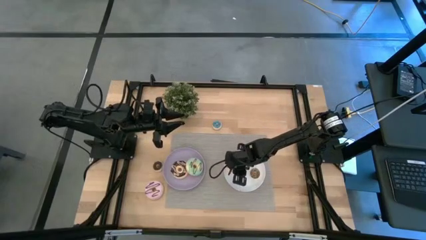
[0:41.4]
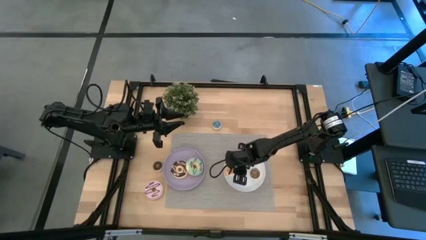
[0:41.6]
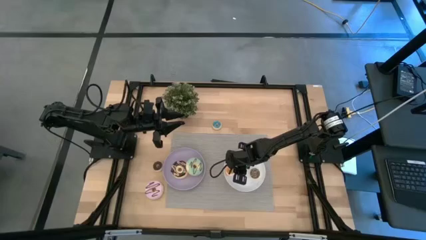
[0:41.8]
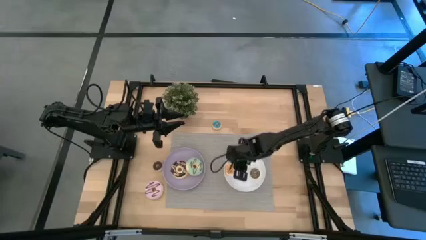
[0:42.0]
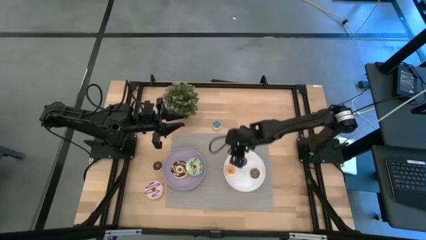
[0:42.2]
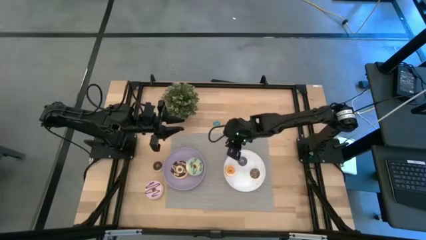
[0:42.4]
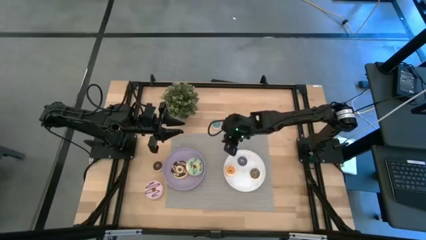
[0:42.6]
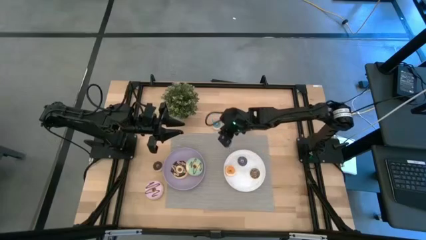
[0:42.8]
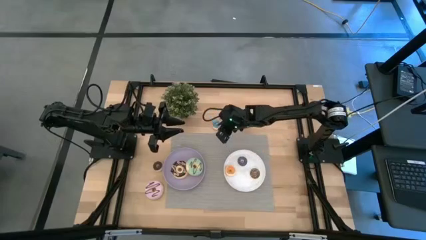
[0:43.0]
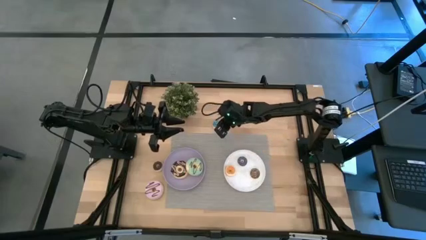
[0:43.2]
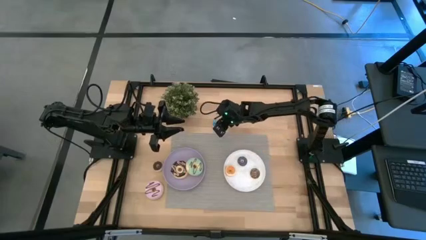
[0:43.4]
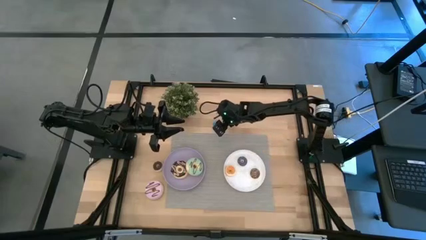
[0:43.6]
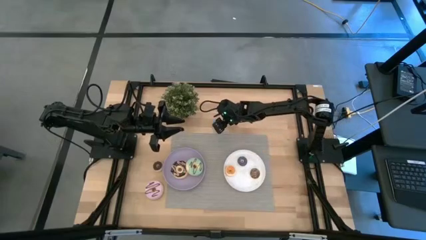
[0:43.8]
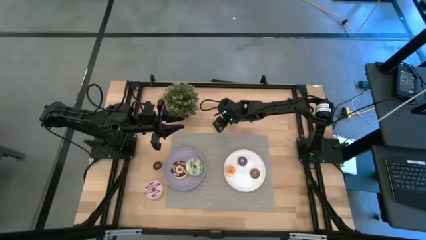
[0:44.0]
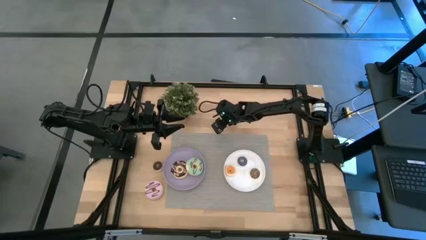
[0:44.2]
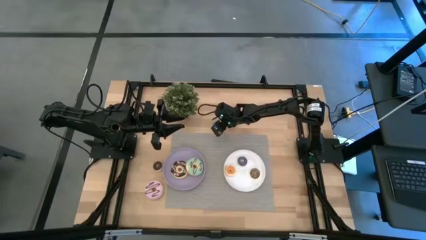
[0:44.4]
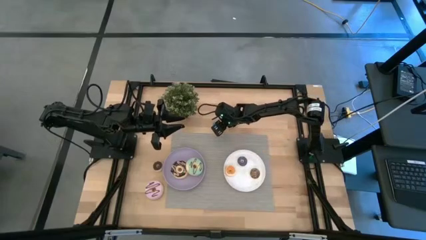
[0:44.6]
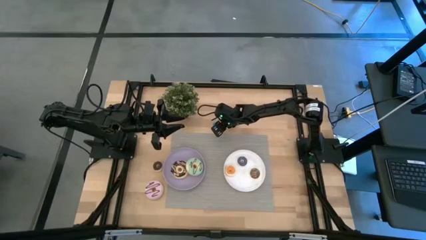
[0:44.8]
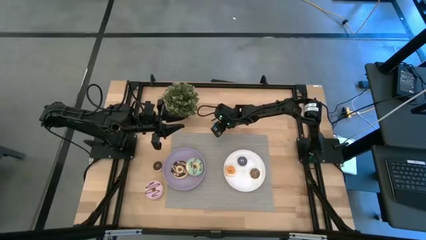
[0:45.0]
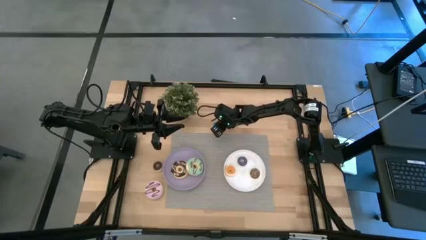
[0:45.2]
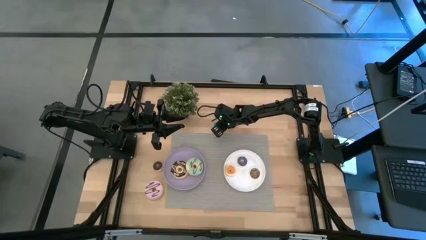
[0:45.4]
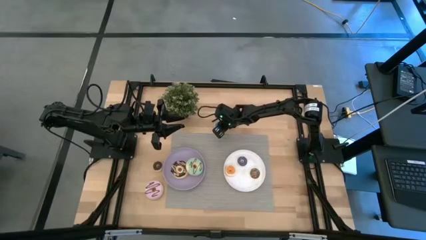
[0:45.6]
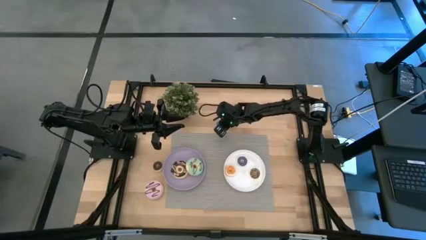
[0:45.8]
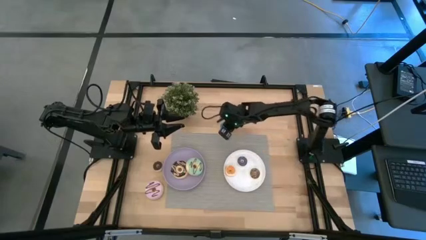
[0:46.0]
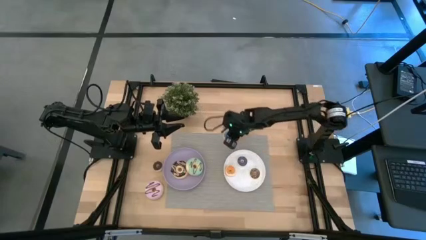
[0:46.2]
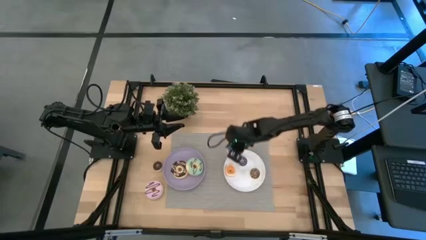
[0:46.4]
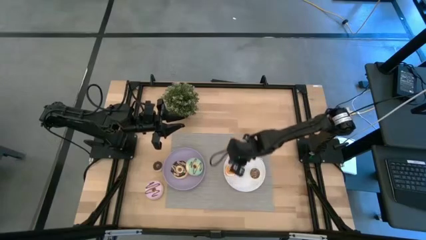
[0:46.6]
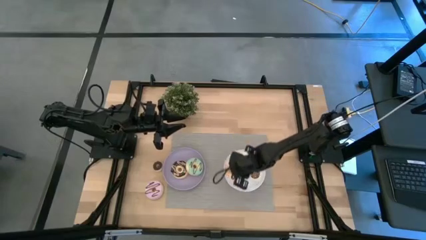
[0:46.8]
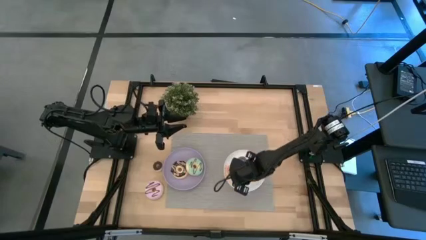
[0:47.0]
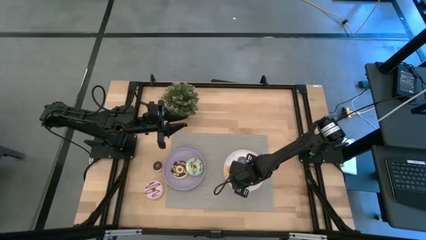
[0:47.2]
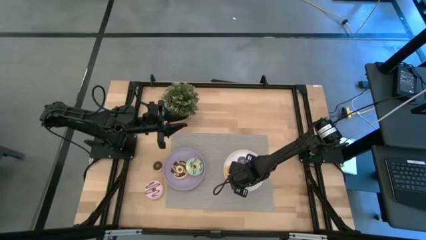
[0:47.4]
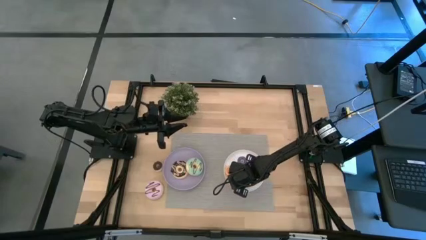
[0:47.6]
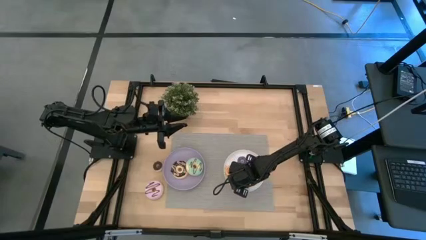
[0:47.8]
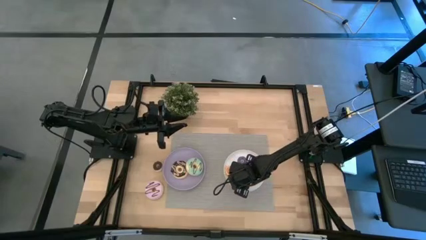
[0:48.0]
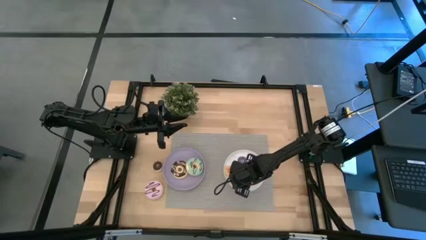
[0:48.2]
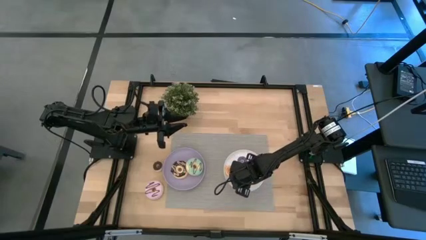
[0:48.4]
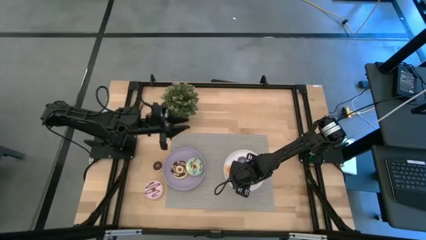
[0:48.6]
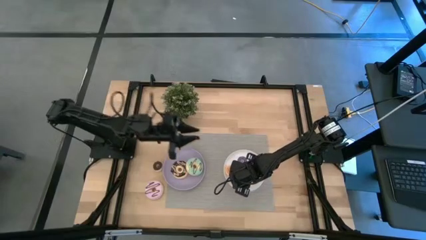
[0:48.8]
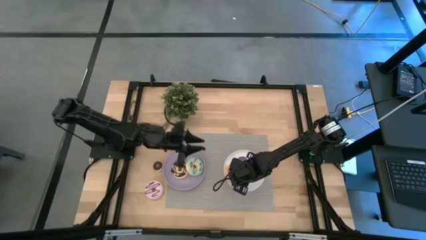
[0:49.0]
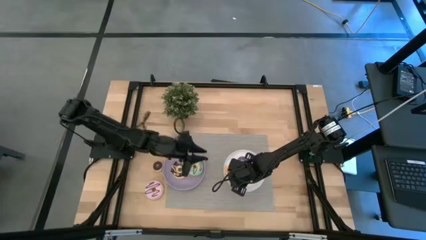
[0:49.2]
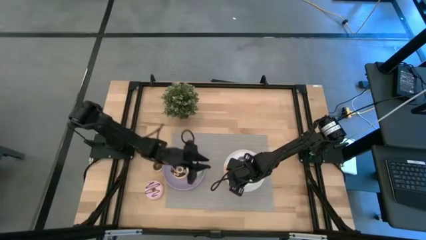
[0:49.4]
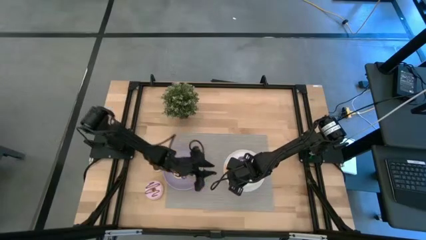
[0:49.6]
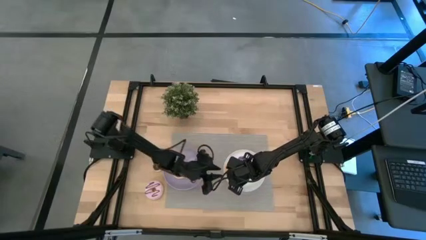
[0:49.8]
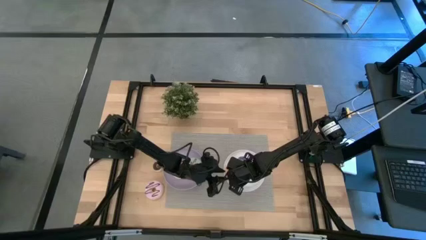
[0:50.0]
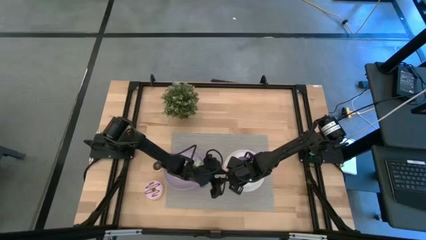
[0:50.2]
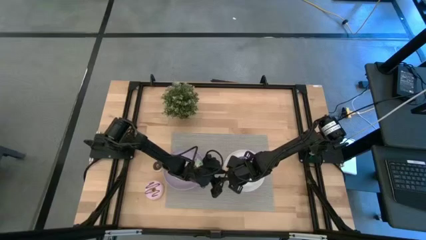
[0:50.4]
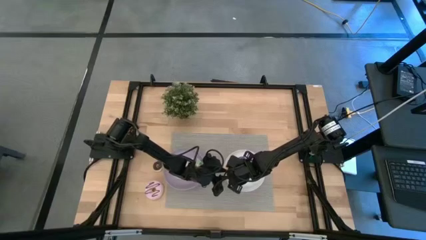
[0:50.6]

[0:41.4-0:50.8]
Task: Pick & Place donuts
Put the small blue donut on the white plate

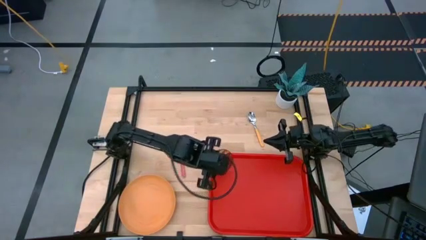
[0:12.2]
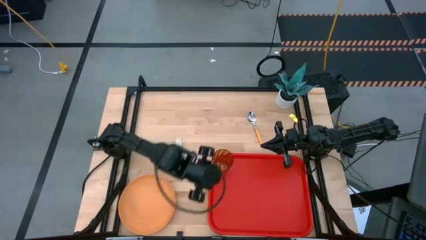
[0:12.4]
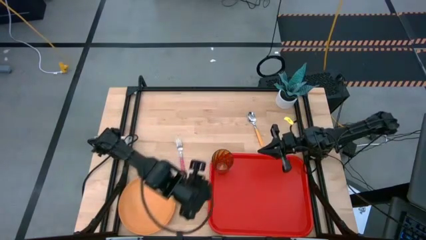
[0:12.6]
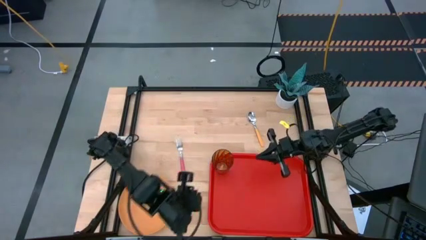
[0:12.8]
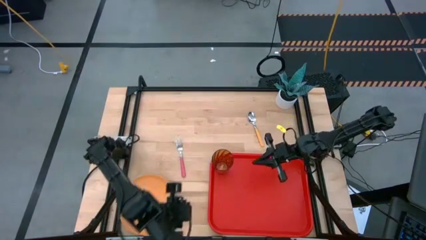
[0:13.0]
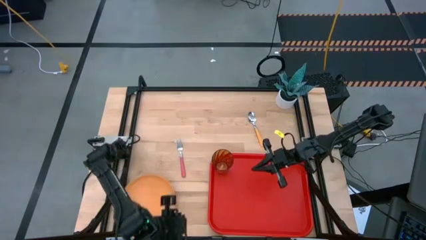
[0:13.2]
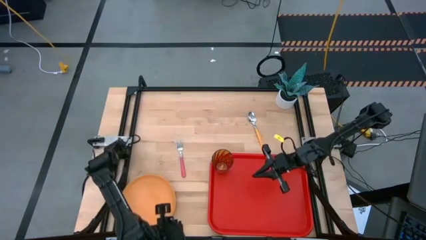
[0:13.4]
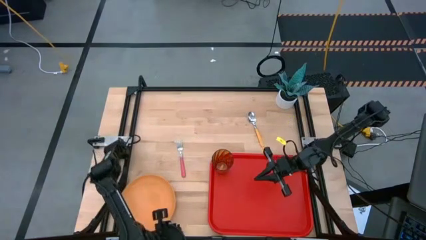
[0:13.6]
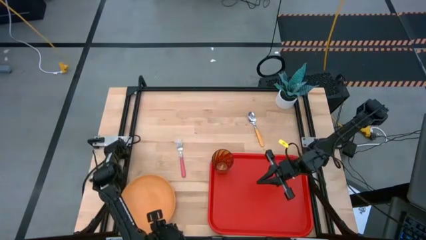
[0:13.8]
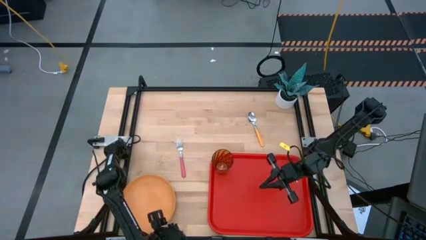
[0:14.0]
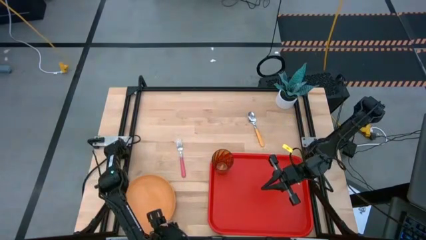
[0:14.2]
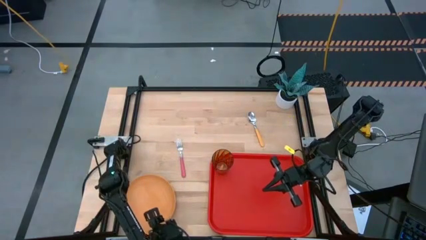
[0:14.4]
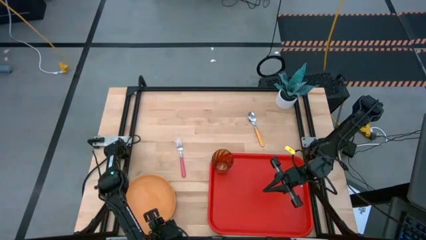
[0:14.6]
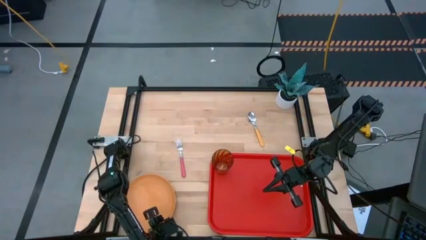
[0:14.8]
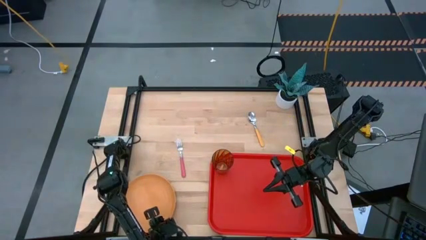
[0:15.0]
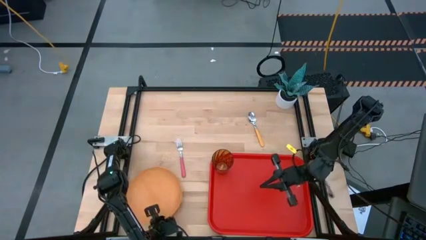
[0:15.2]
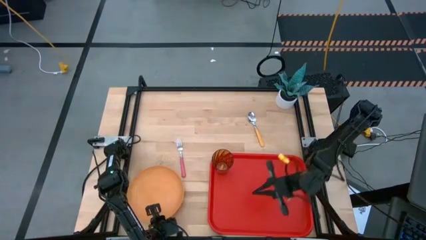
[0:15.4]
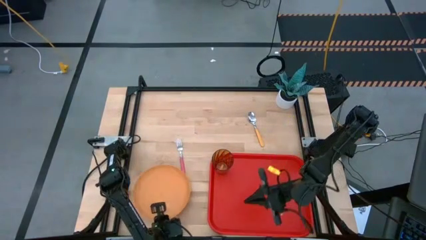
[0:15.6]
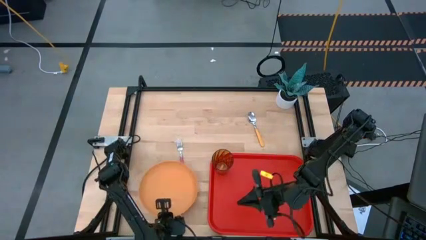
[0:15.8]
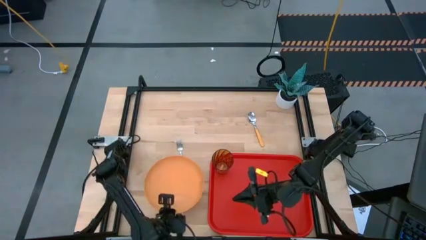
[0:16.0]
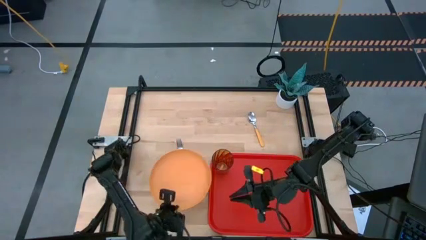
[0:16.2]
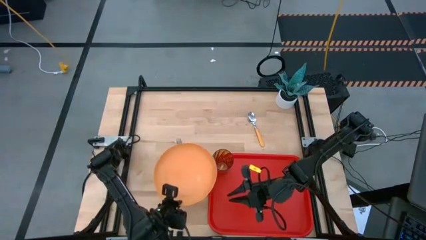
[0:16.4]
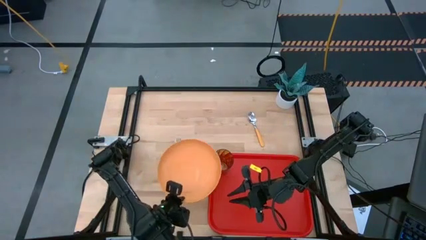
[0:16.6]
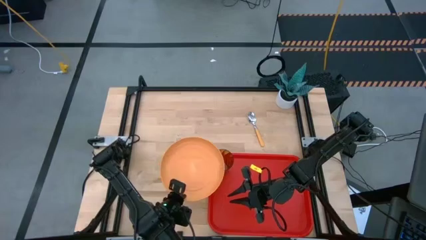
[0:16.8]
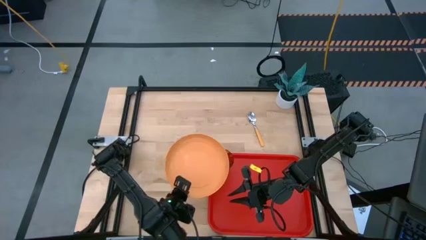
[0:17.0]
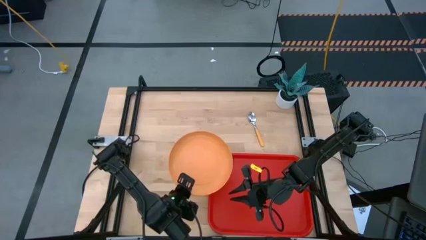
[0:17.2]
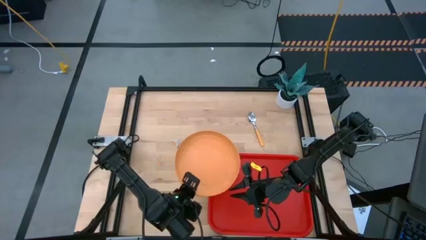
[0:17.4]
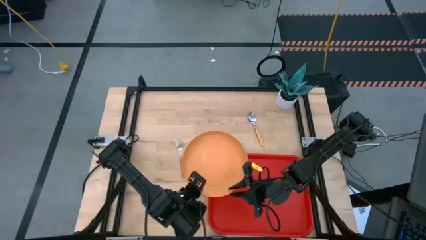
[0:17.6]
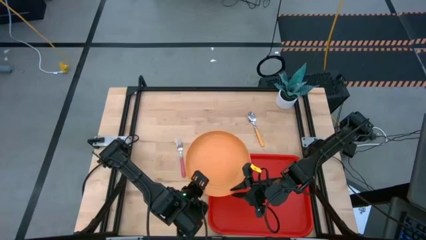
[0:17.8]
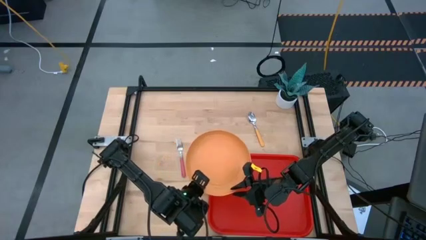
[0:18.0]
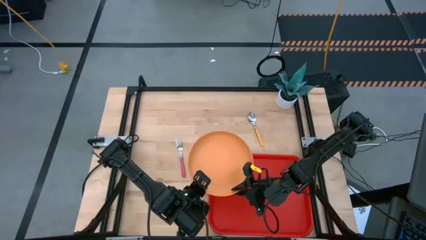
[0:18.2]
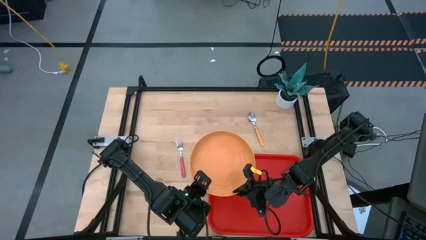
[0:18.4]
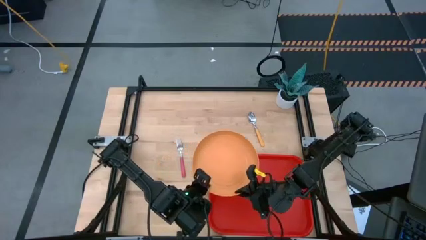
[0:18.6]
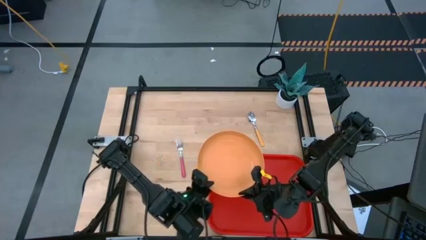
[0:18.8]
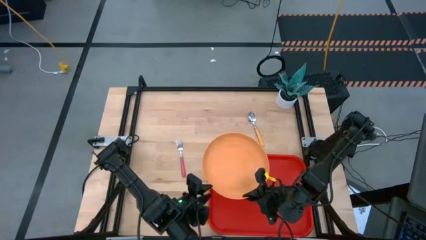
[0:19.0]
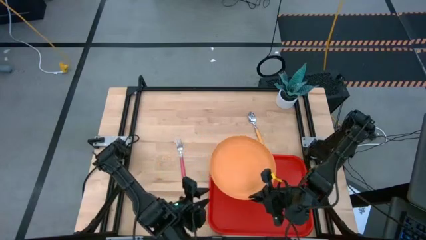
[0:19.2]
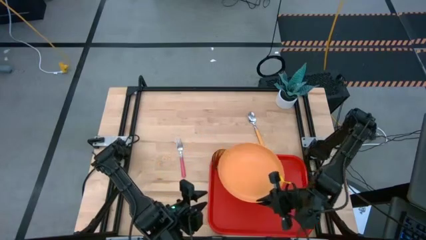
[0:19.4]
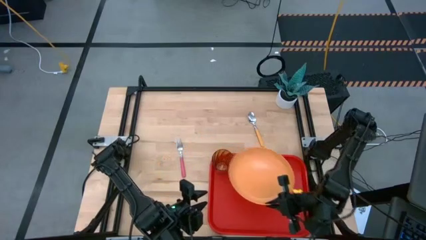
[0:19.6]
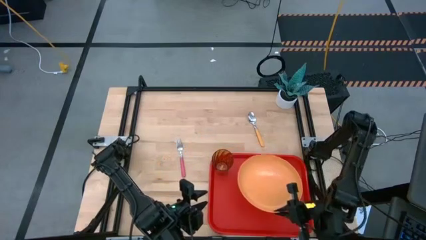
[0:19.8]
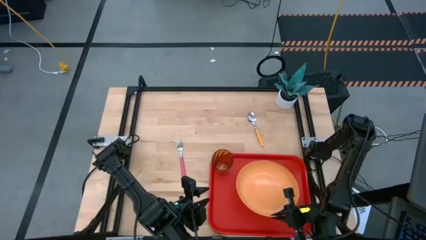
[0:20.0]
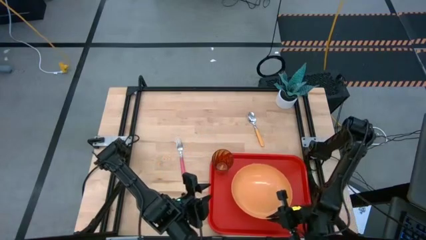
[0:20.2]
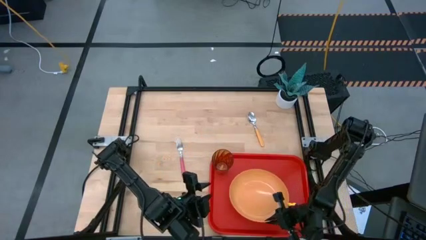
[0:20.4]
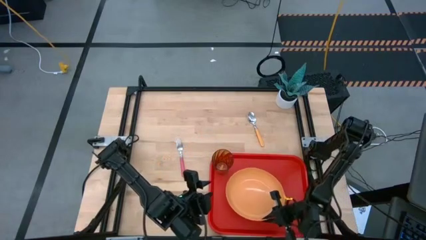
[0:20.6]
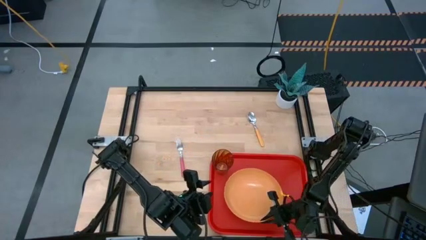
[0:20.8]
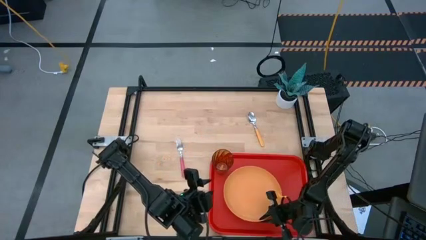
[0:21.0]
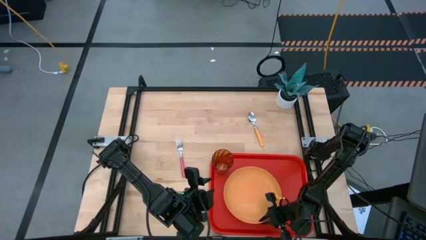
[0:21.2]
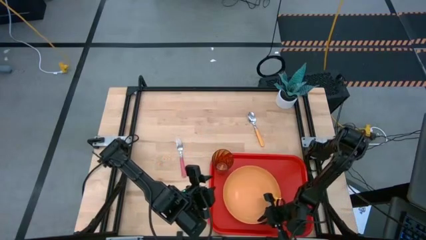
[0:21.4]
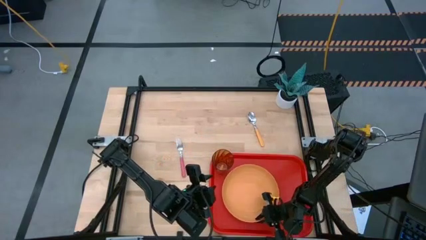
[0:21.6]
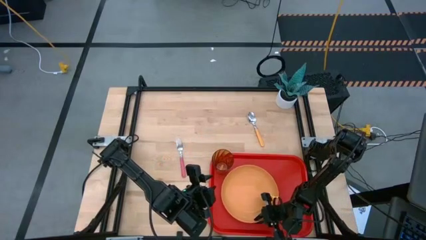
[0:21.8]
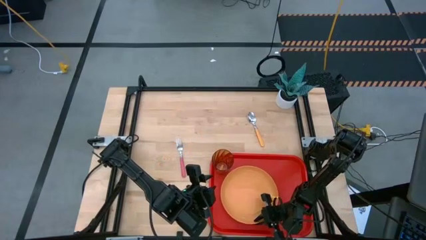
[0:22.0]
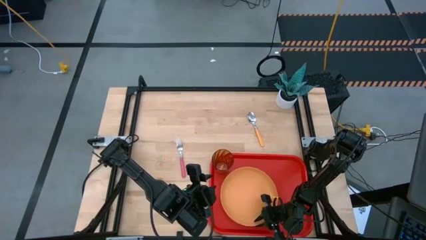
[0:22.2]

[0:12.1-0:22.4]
Task: Pick and place plate/cup/fork/spoon on tray
Put the orange plate on the red tray
